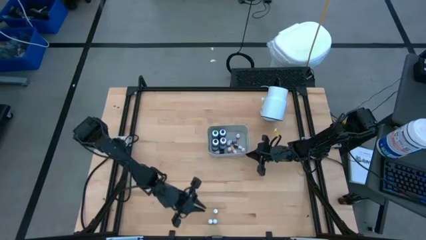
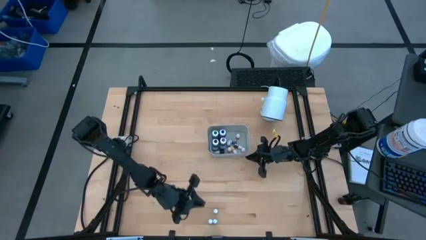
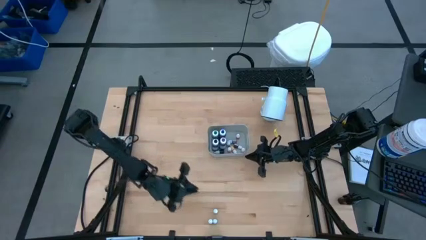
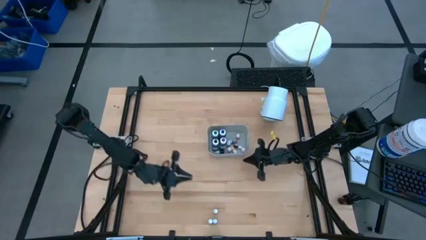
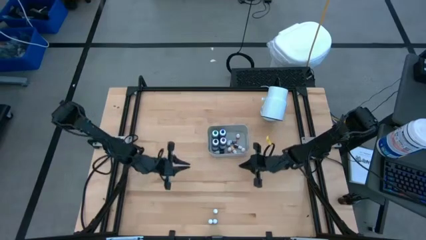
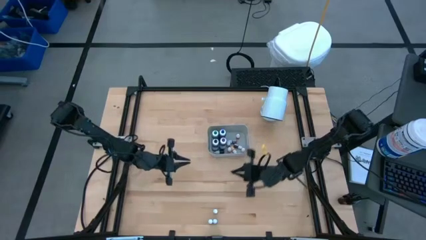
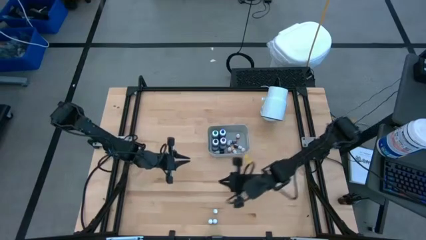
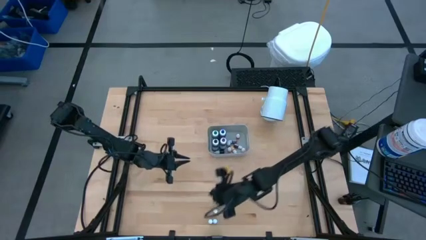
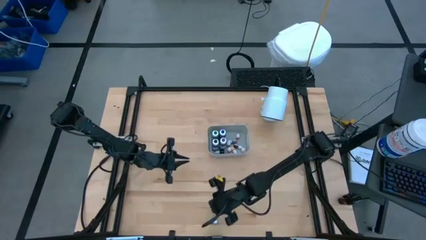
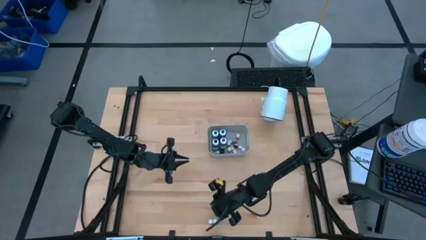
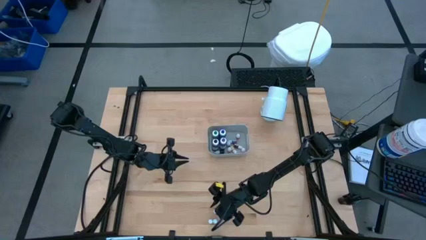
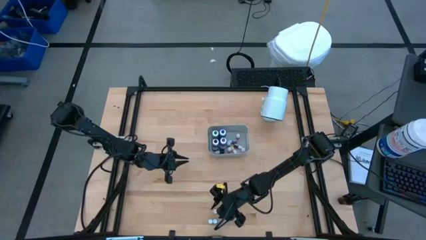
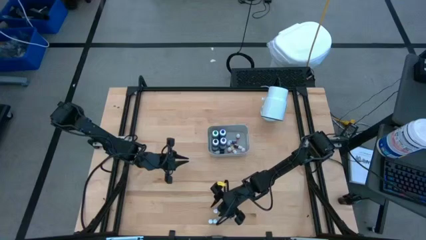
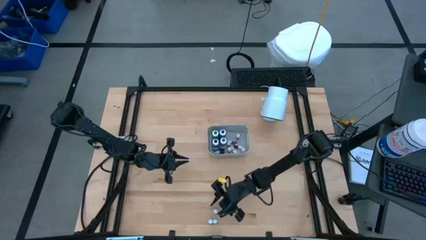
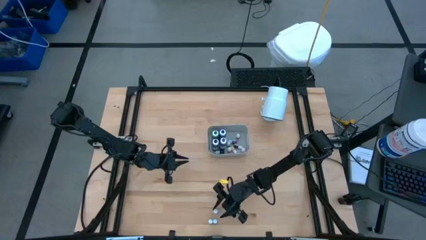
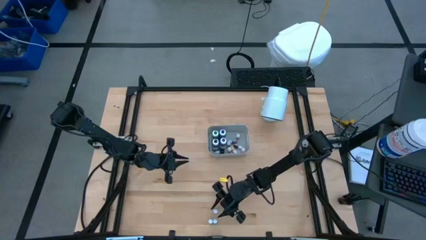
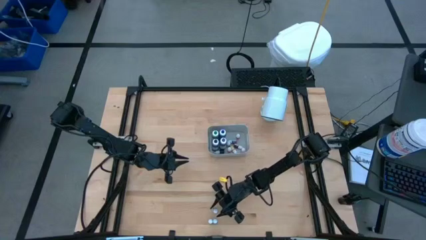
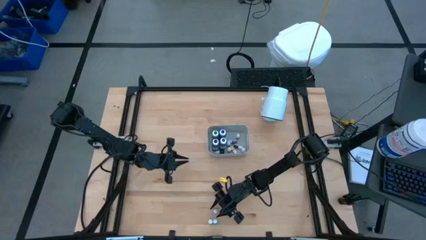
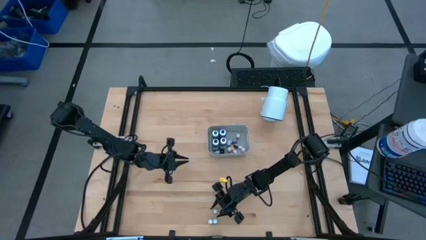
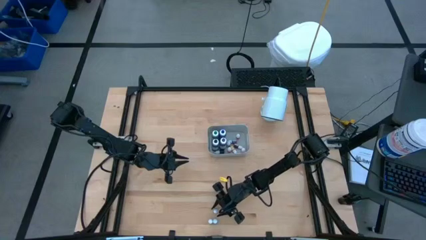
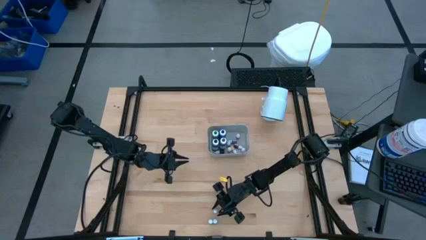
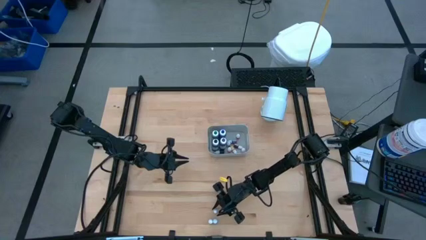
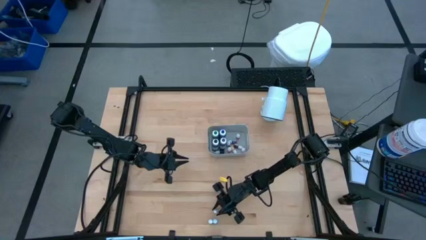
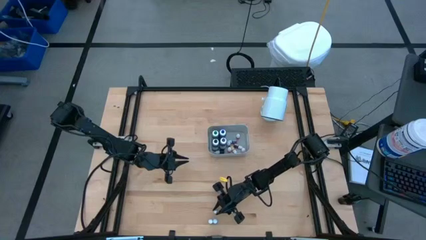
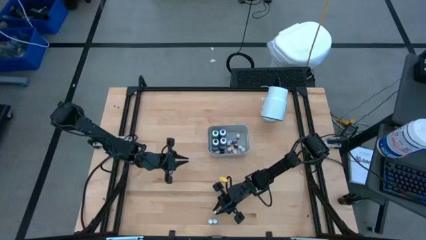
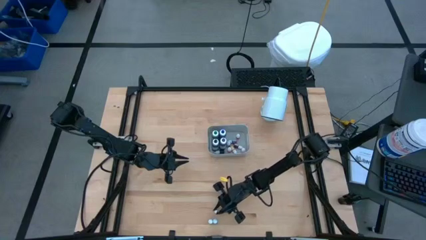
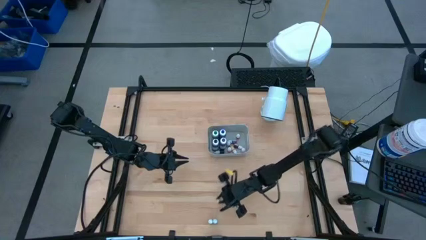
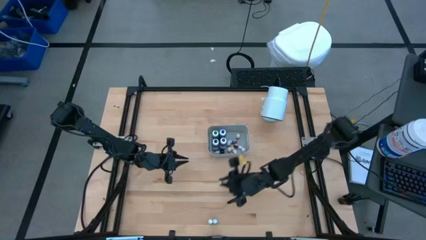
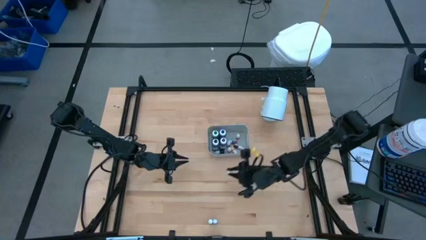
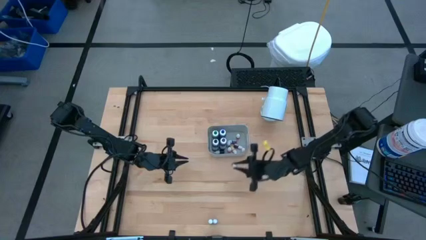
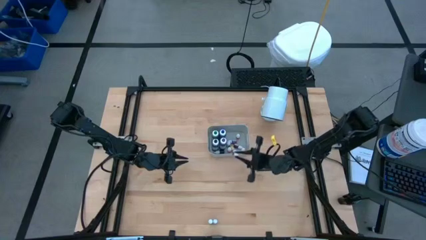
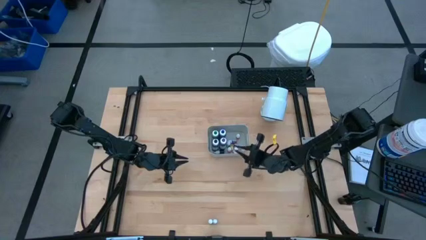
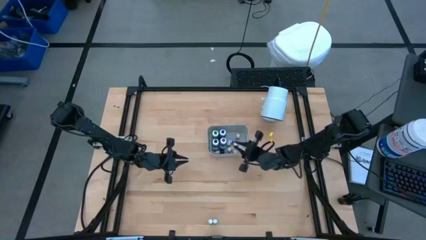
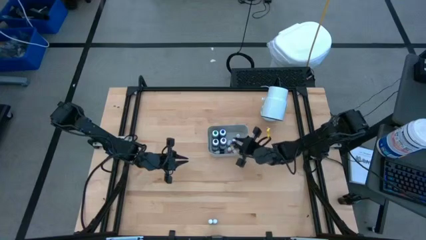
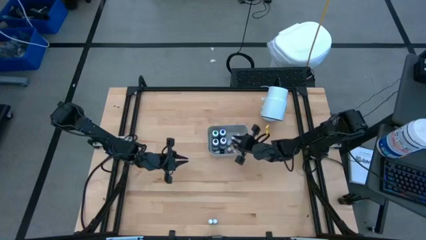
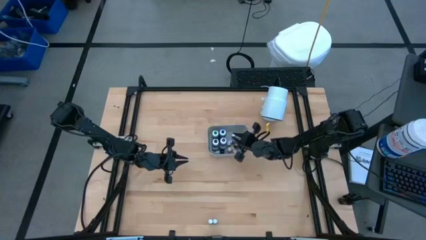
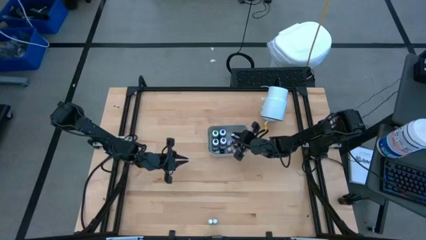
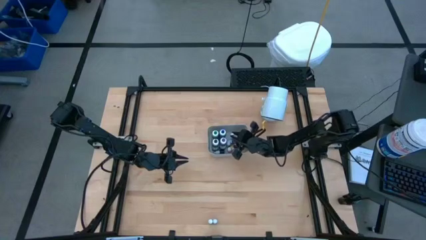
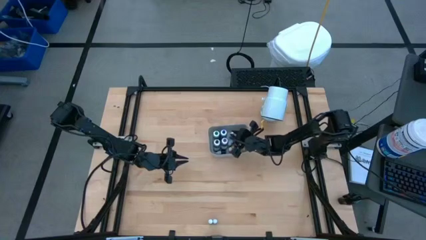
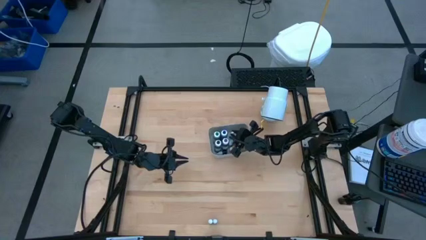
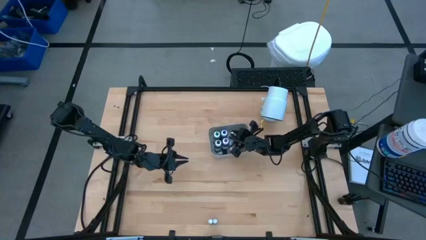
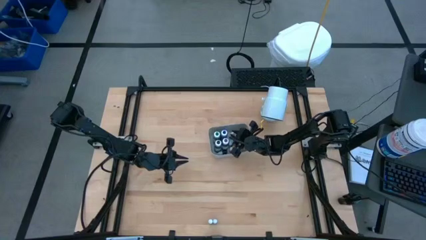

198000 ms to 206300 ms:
Task: Pick & Place food coloring
Put the small purple food coloring bottle into the gray bin

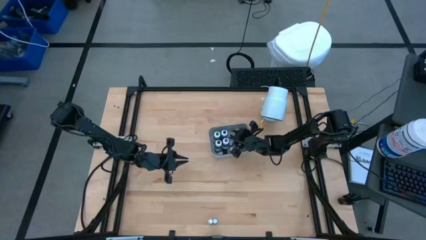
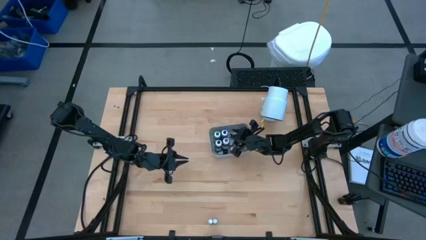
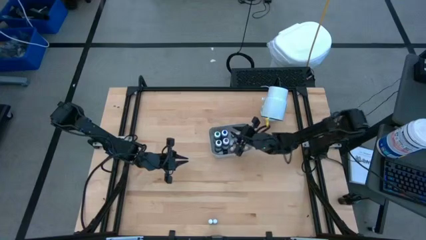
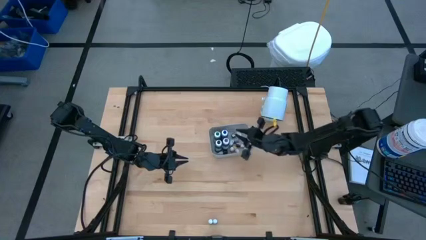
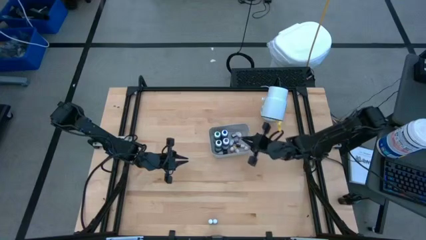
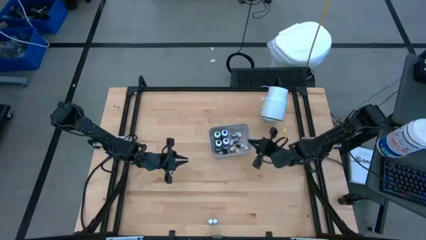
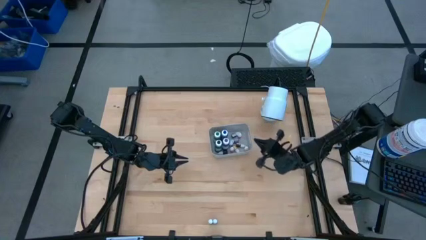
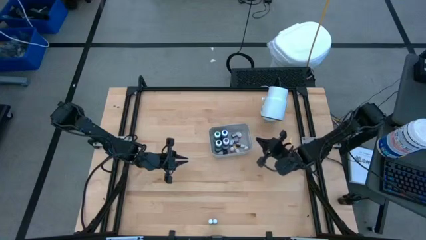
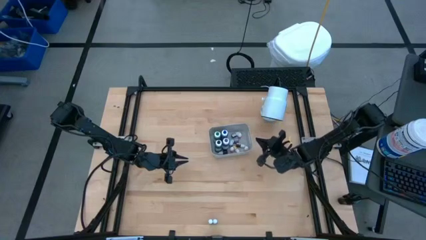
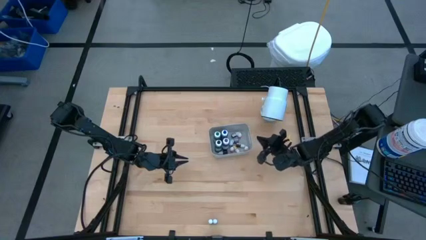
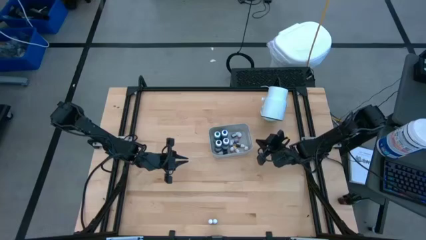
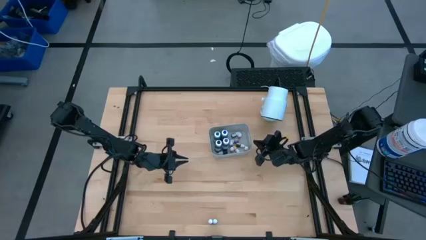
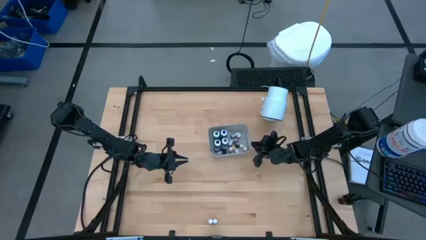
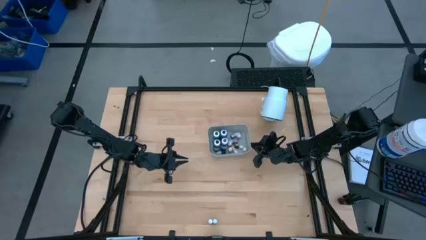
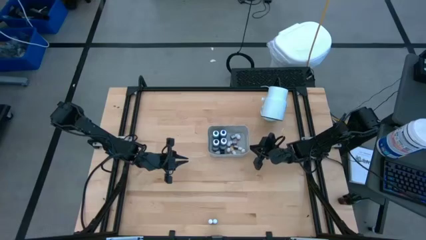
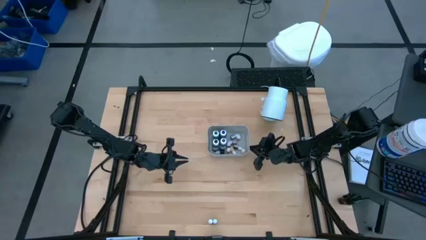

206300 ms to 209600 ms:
Adjust the gray bin
